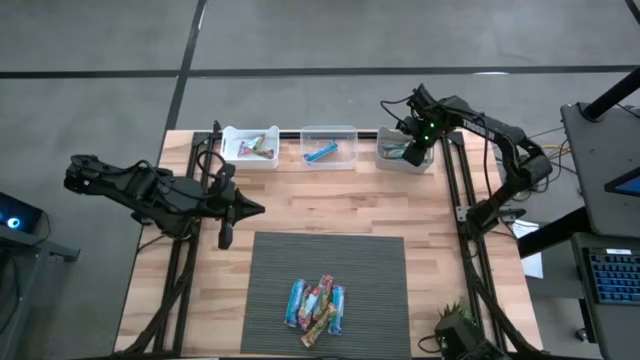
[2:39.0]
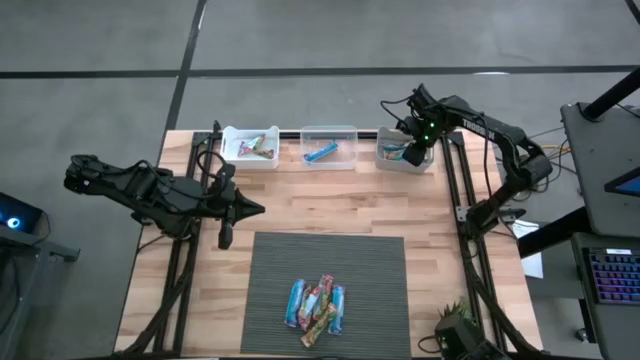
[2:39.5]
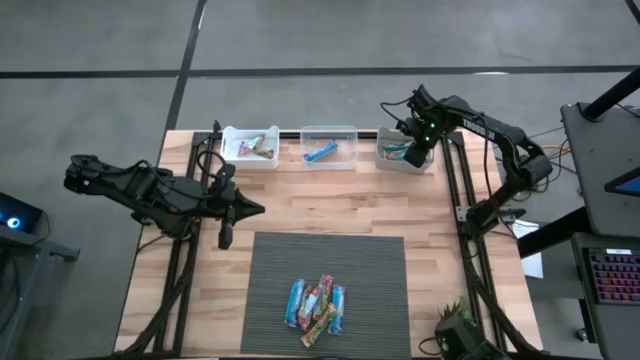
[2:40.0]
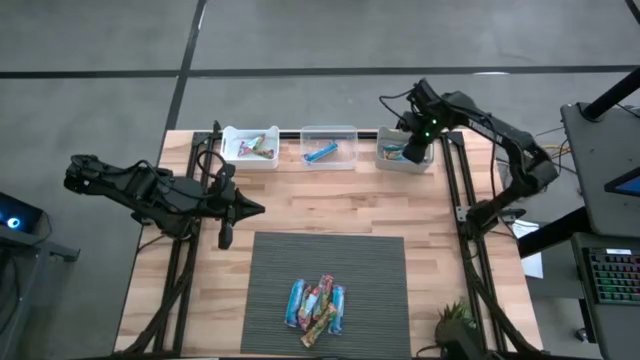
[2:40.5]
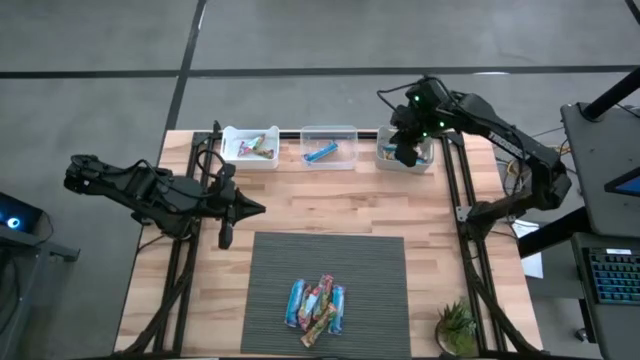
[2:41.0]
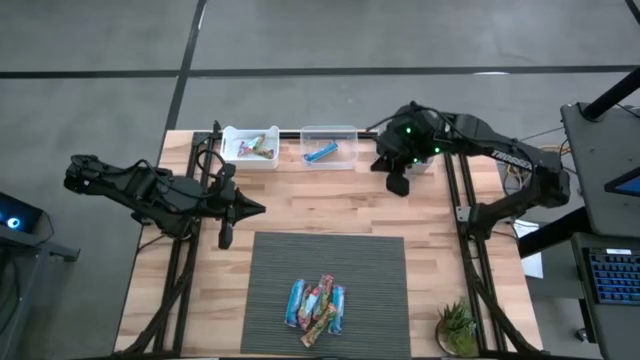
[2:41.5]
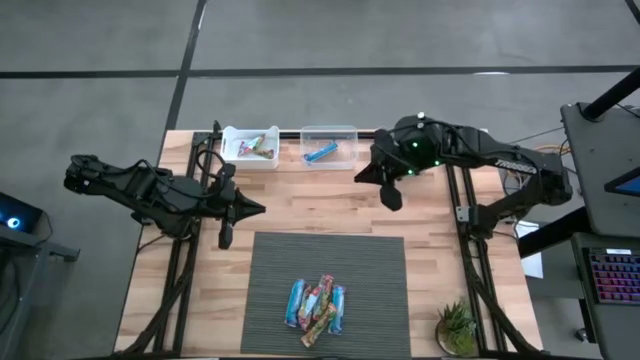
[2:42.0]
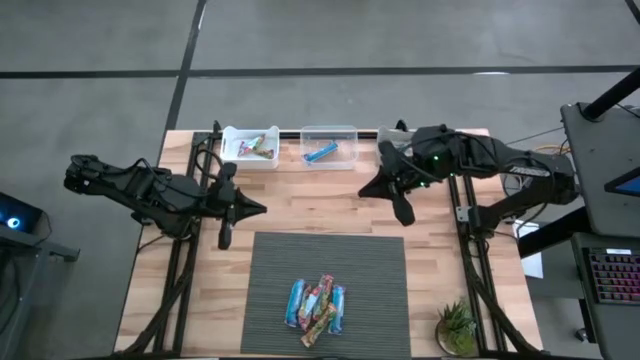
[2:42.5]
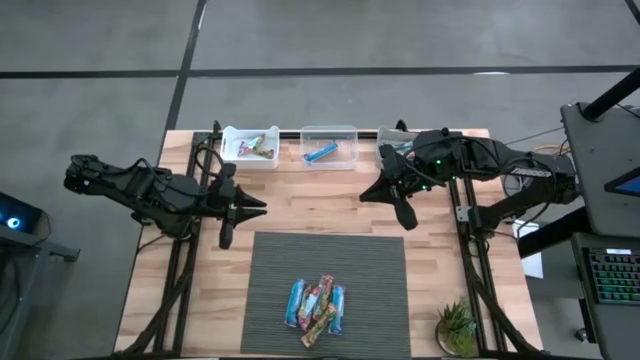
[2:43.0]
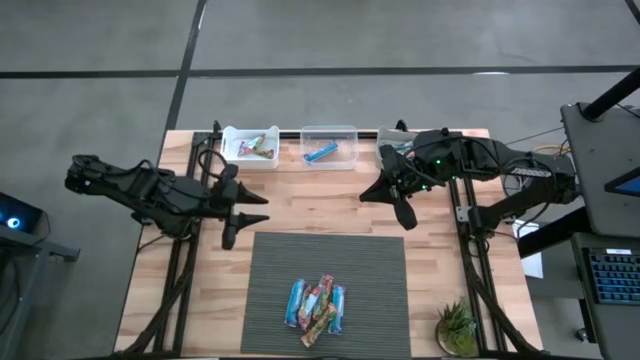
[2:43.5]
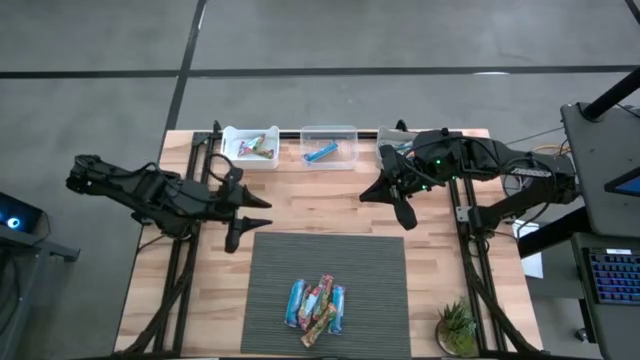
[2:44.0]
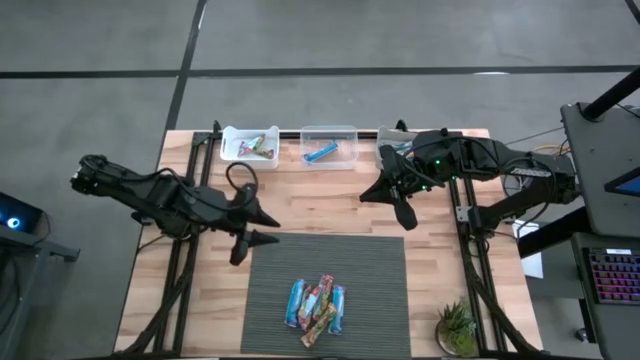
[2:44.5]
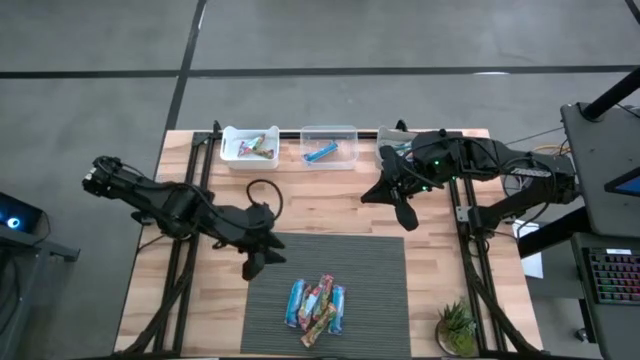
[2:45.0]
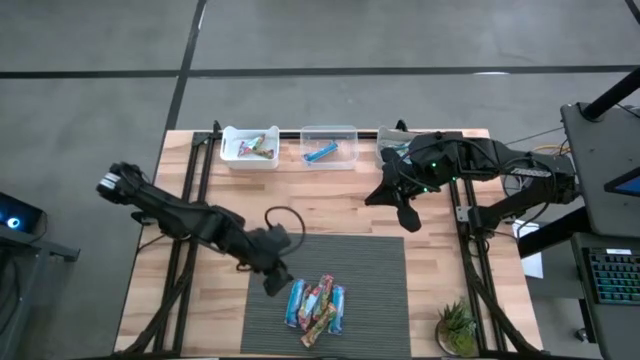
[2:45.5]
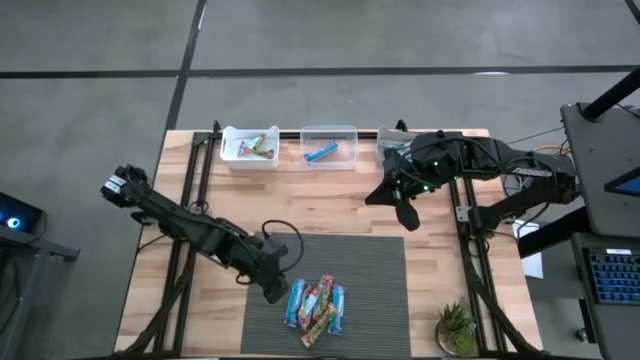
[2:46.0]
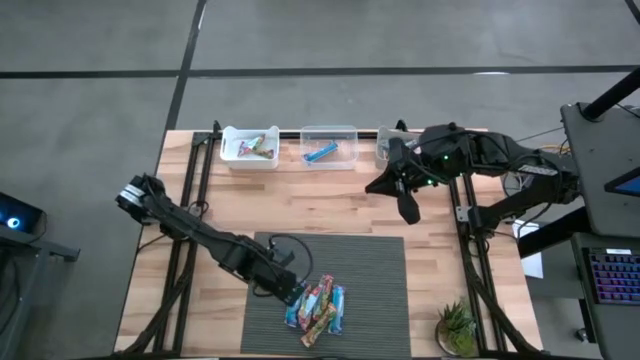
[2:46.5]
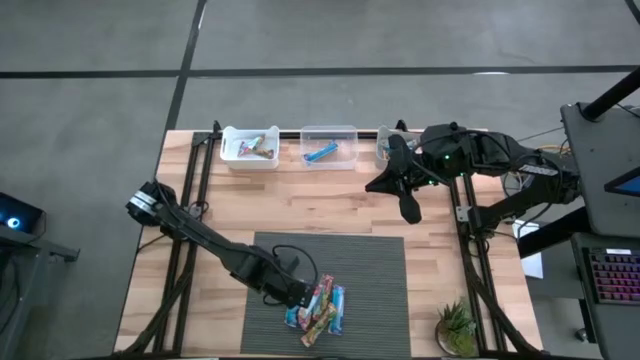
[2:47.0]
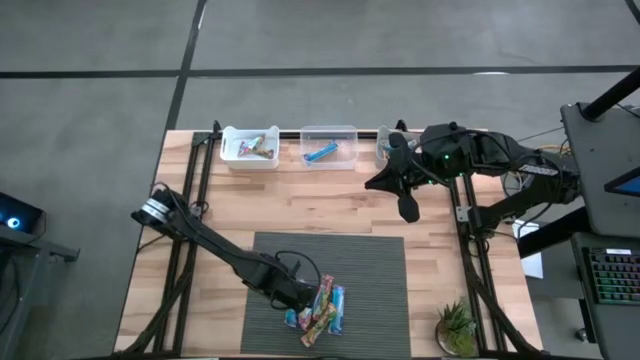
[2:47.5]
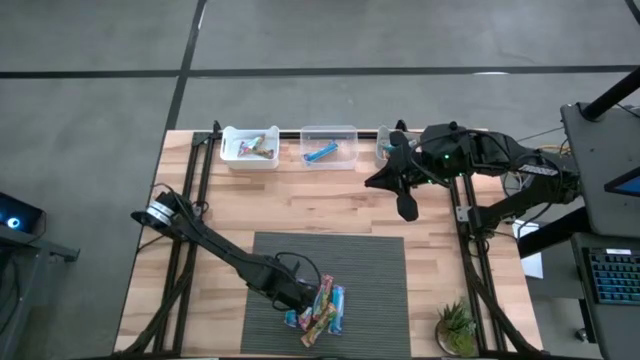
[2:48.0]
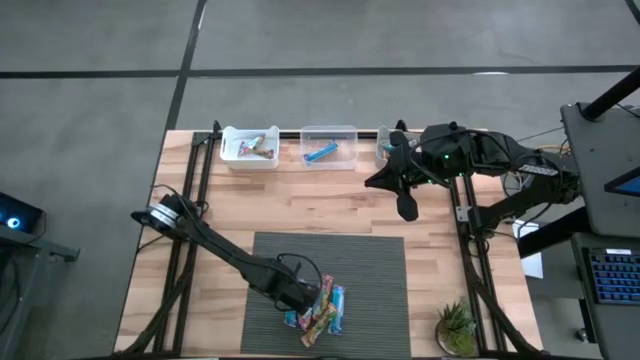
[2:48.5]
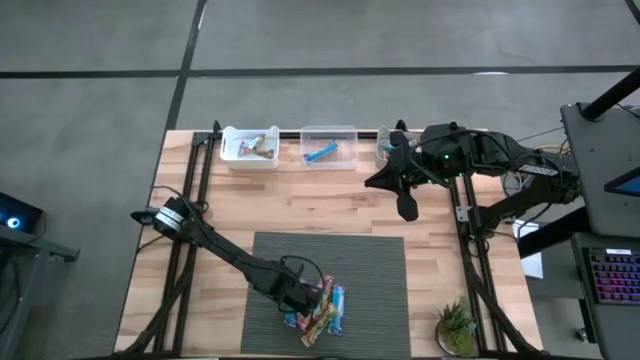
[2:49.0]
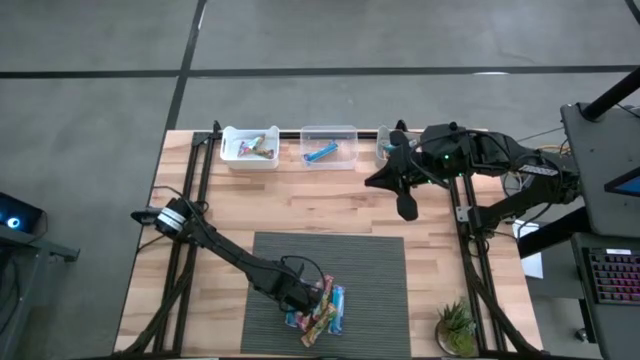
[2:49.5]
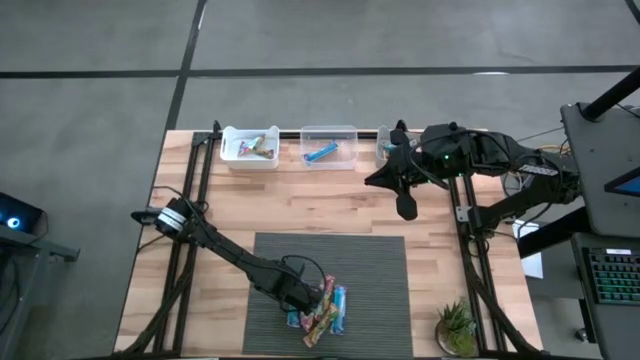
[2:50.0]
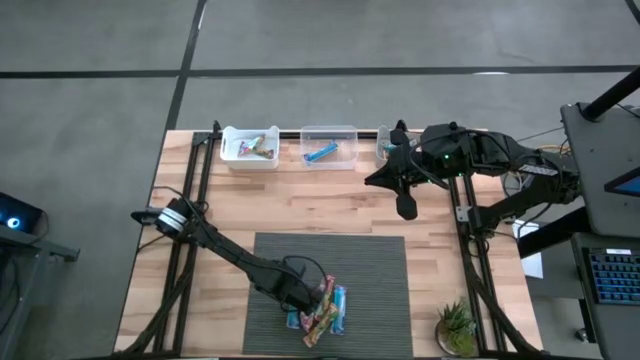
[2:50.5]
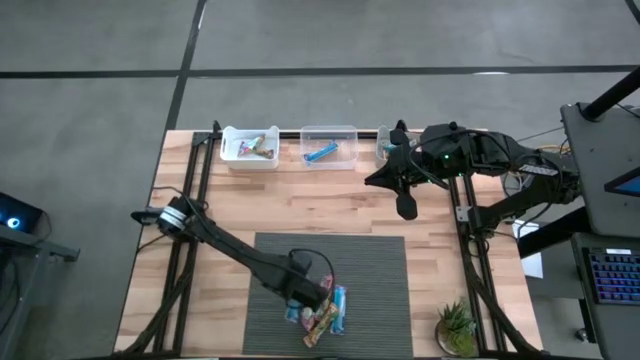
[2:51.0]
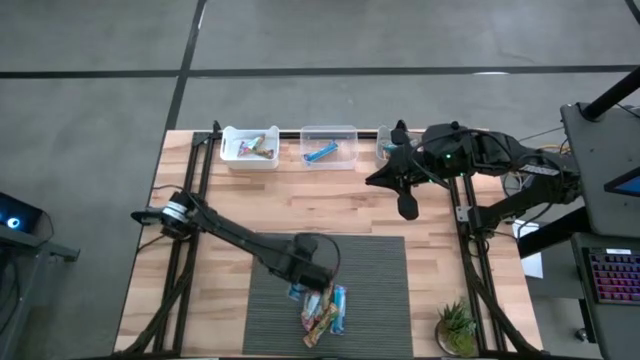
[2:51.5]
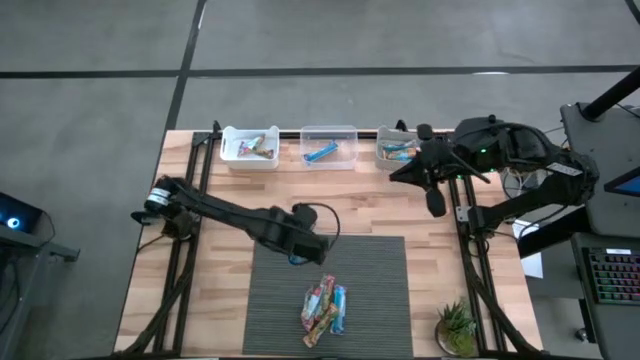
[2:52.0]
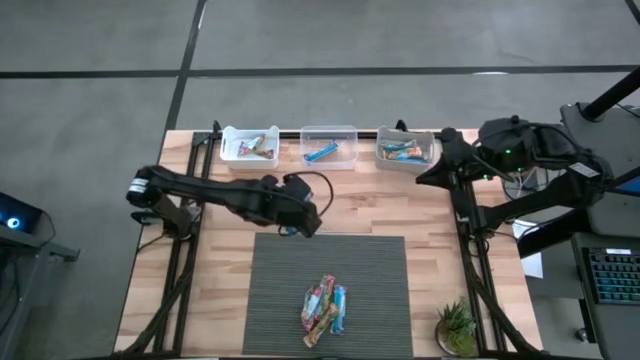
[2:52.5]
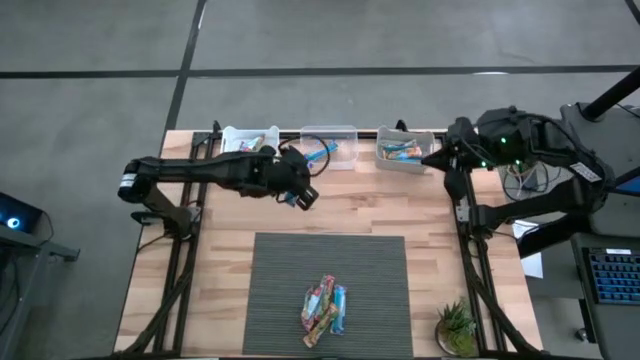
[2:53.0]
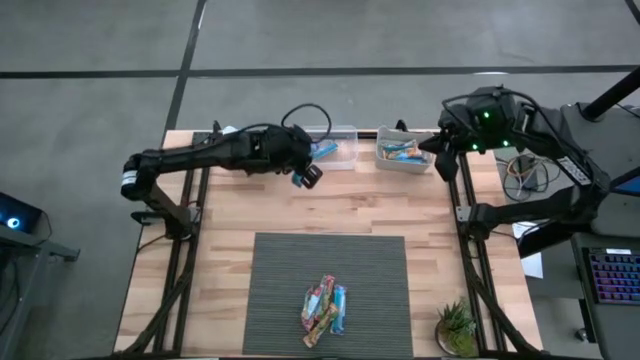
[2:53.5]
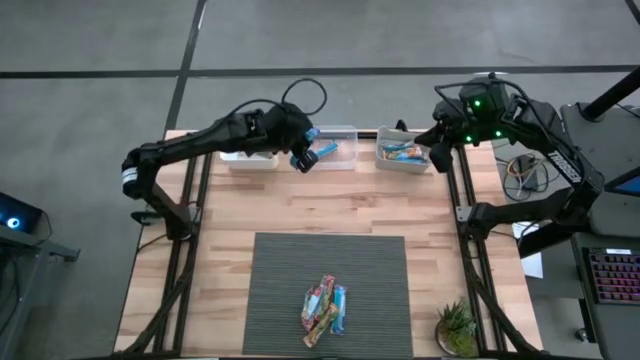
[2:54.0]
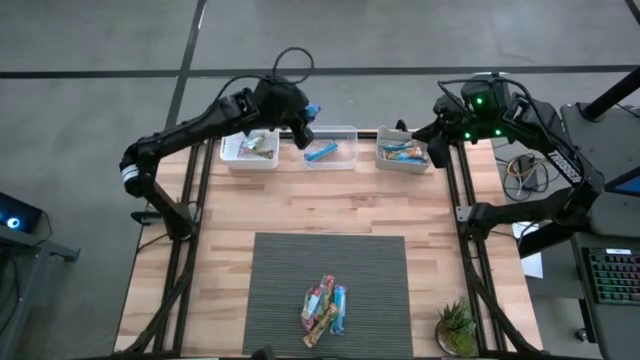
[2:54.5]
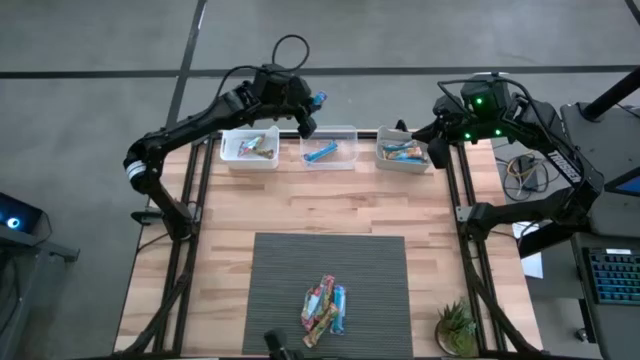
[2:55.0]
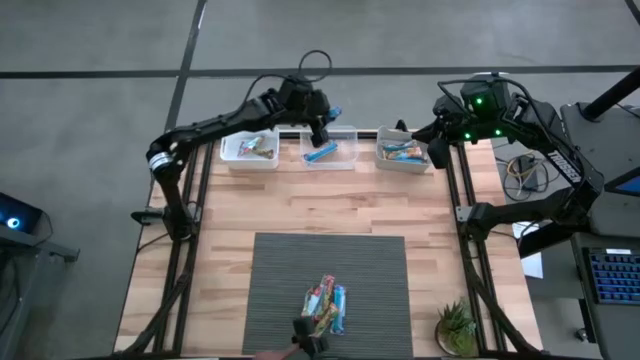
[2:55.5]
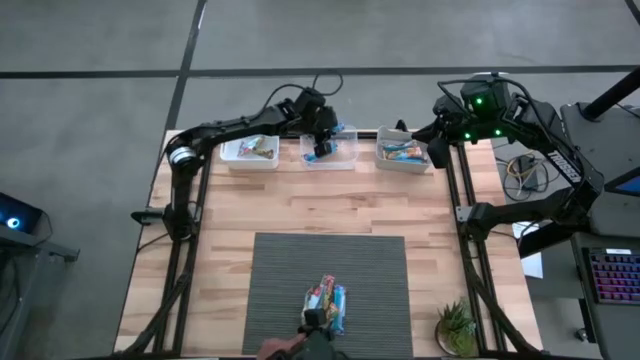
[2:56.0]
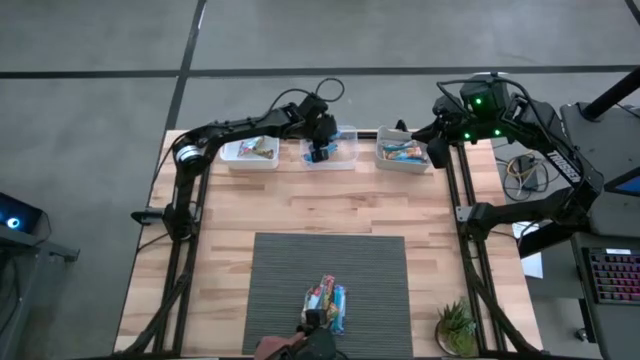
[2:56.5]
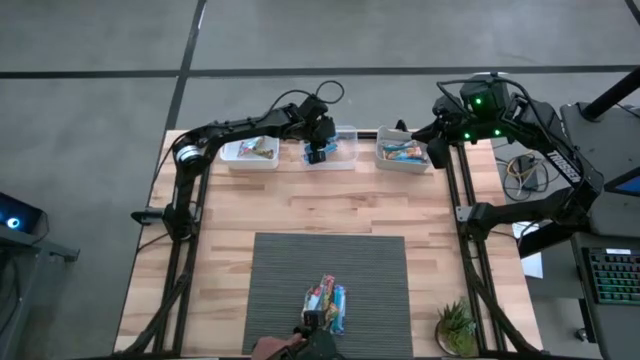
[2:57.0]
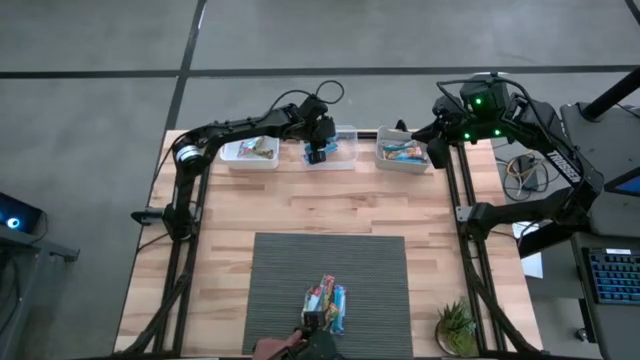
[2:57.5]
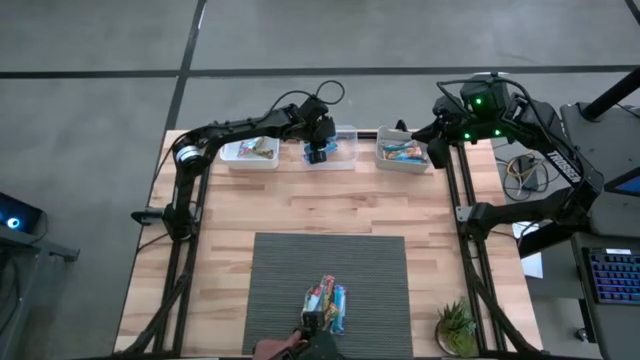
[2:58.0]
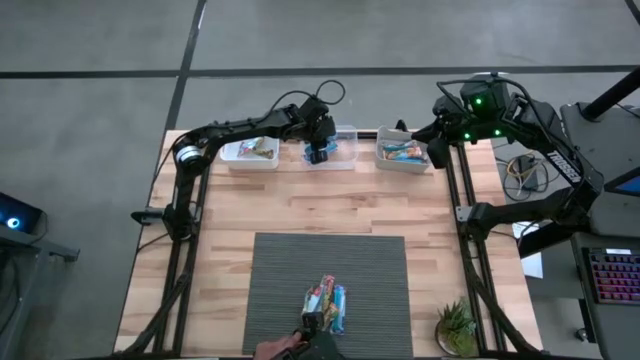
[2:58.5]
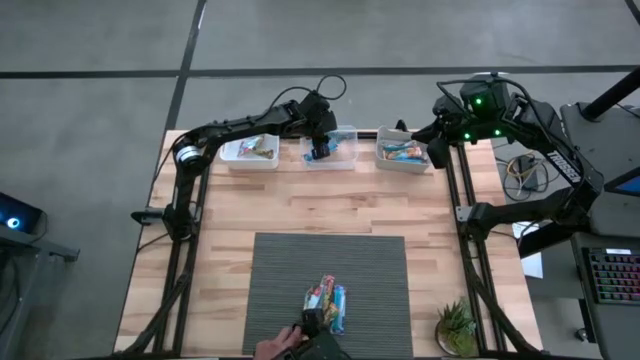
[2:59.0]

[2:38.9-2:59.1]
Task: Pick and place Granola Bars by type
Put the blue granola bar into the transparent bin

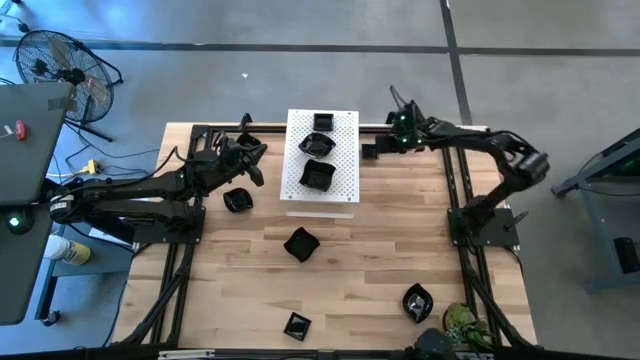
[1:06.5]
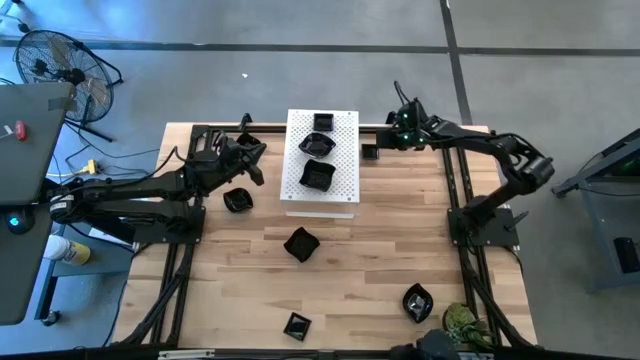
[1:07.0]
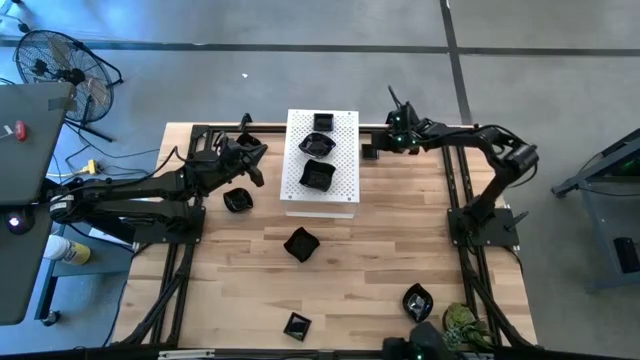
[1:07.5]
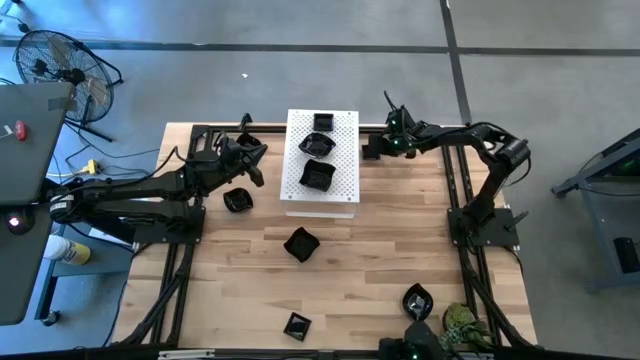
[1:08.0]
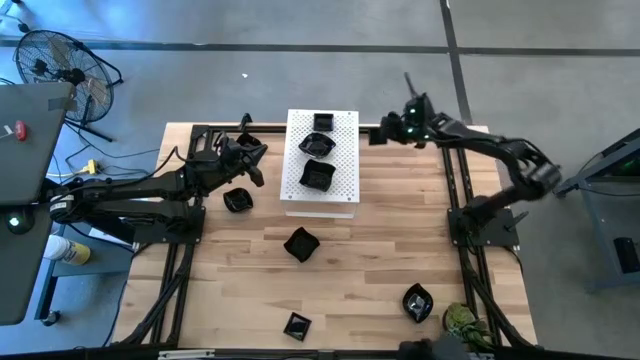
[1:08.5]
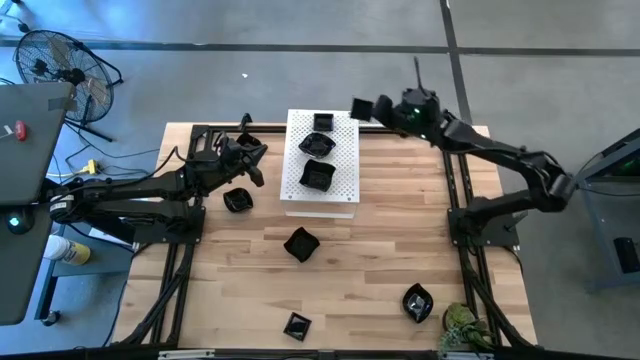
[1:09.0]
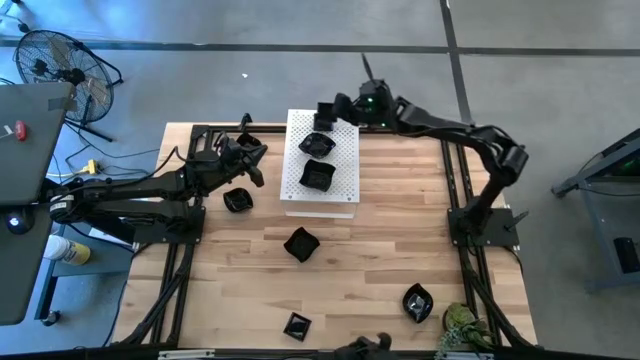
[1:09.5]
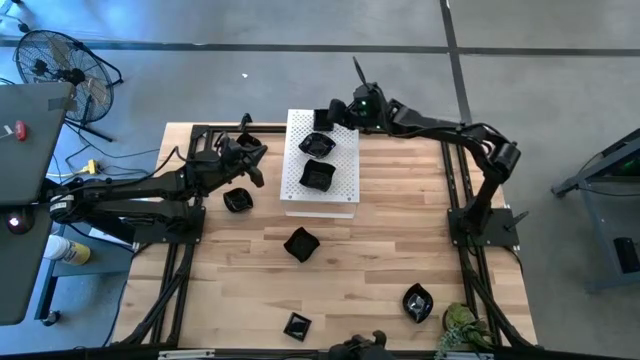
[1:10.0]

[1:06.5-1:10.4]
Task: Pick & Place Mini shaped plates
Stack the square plate on top of the square plate on the shelf
